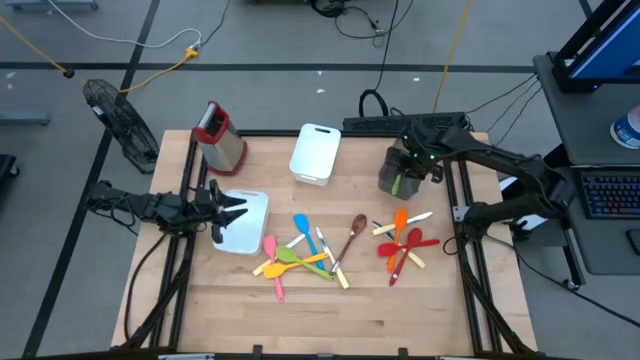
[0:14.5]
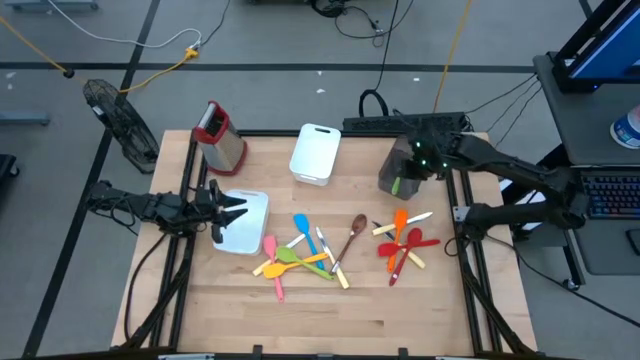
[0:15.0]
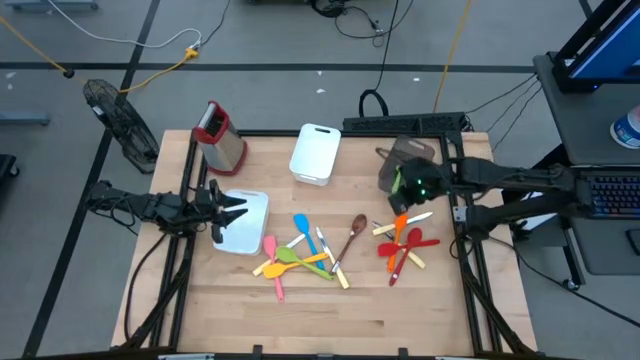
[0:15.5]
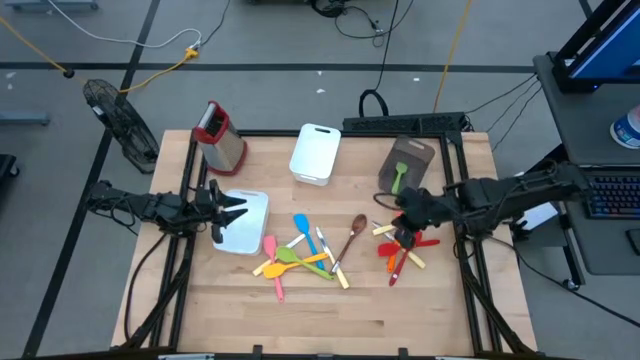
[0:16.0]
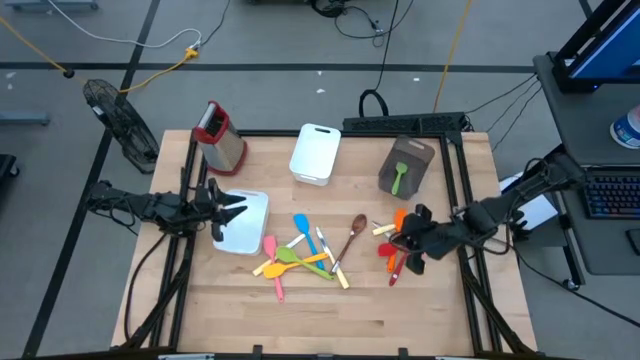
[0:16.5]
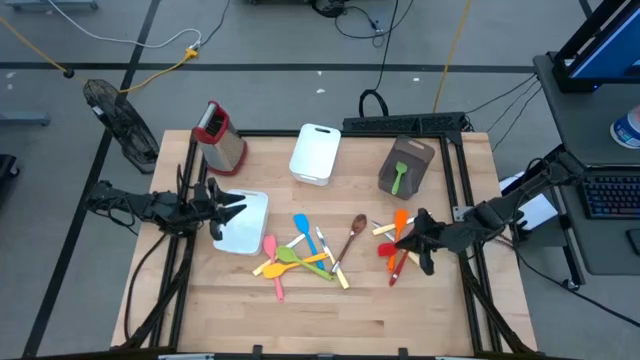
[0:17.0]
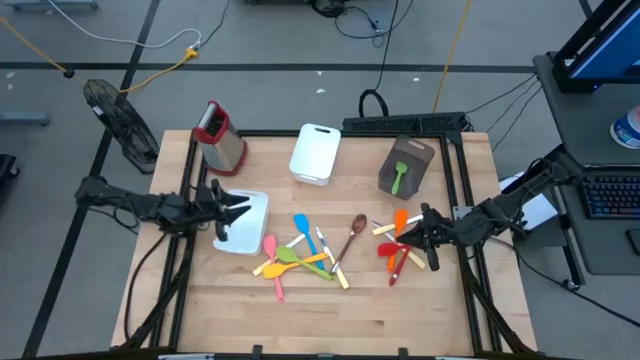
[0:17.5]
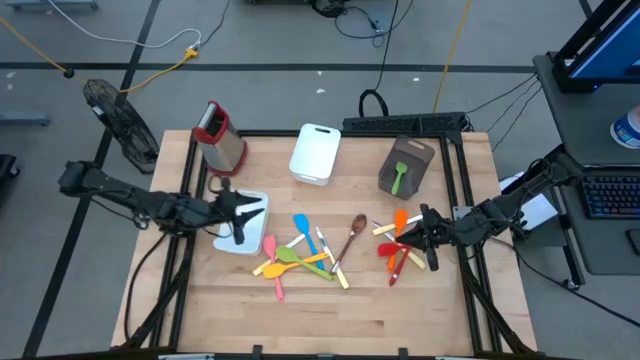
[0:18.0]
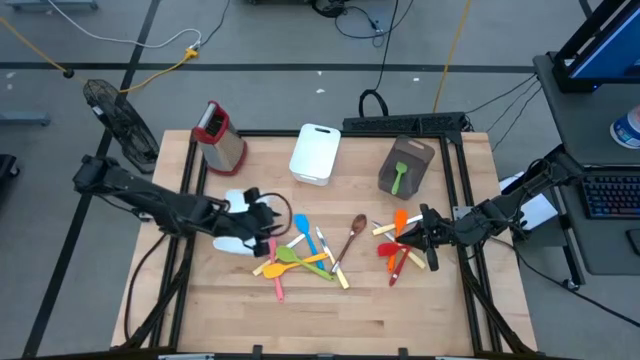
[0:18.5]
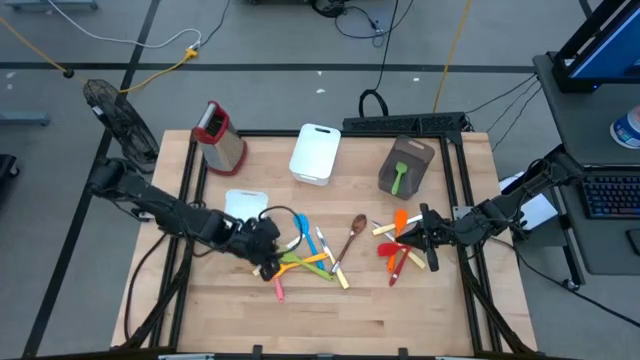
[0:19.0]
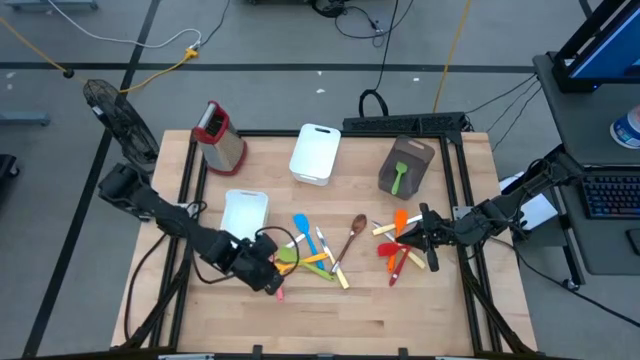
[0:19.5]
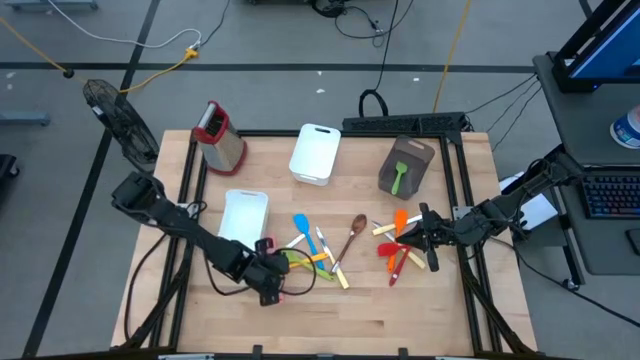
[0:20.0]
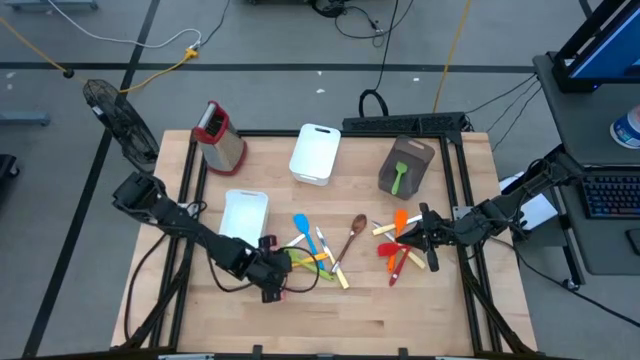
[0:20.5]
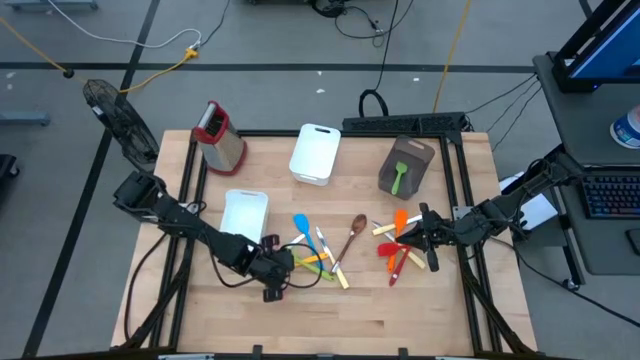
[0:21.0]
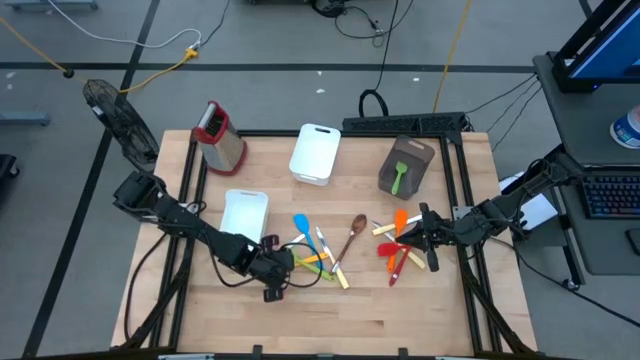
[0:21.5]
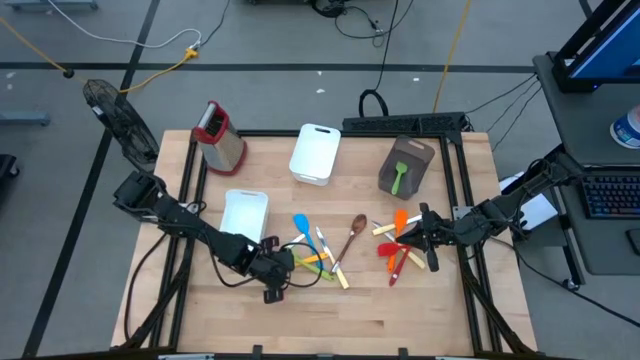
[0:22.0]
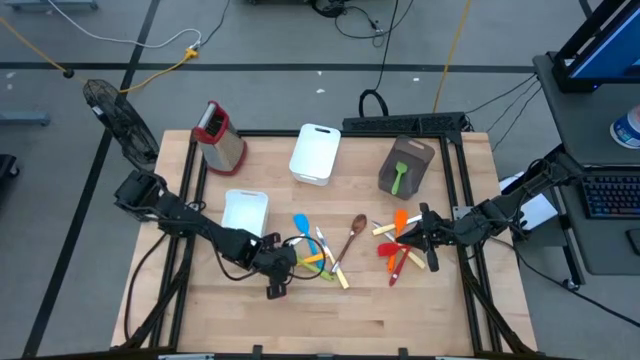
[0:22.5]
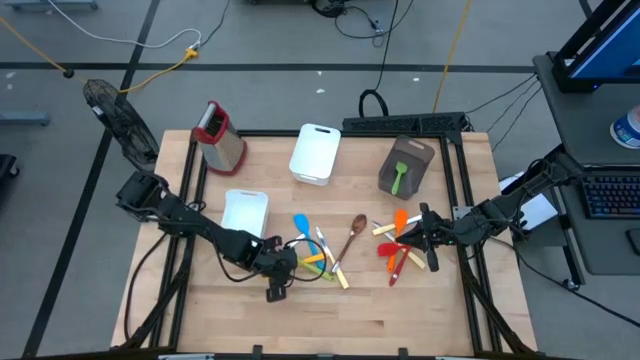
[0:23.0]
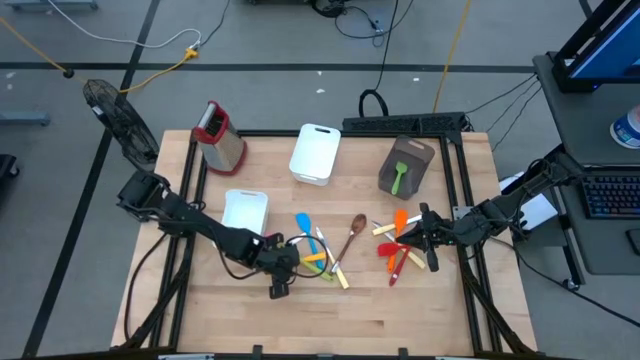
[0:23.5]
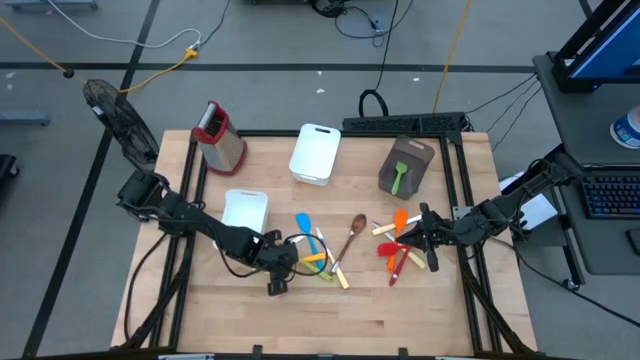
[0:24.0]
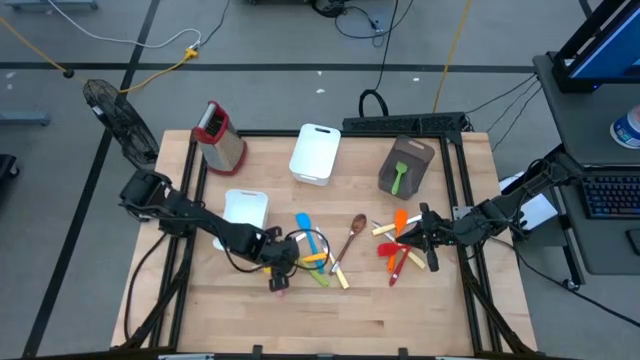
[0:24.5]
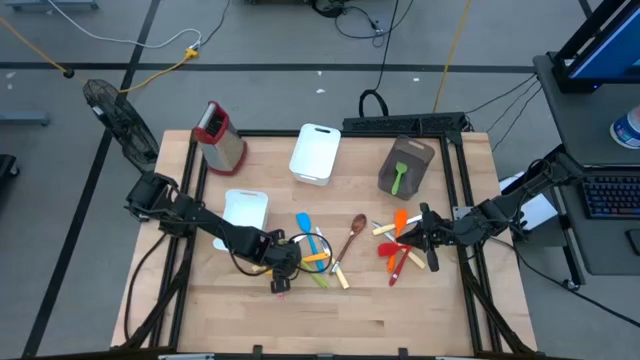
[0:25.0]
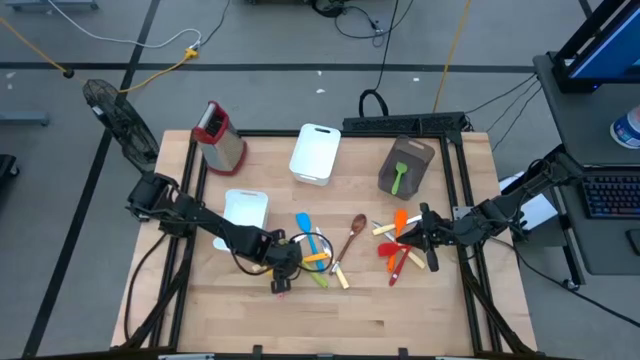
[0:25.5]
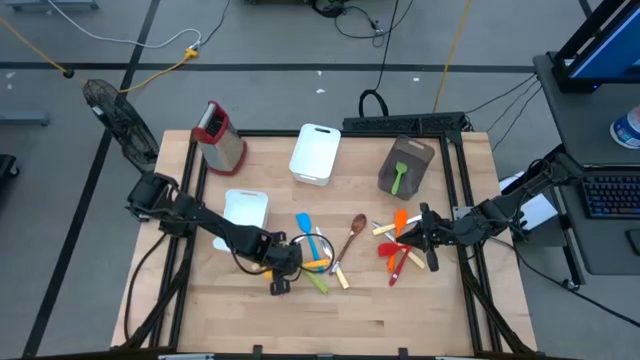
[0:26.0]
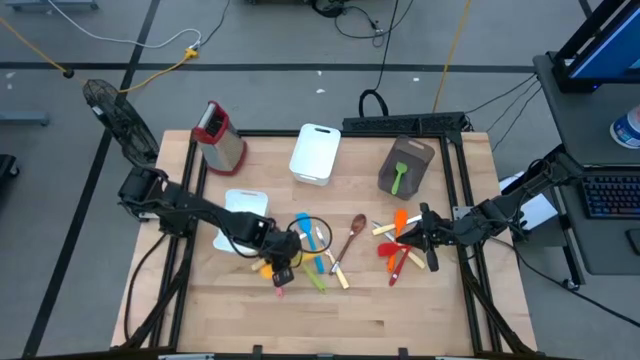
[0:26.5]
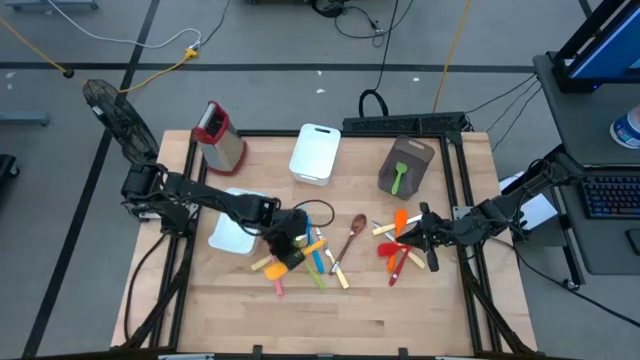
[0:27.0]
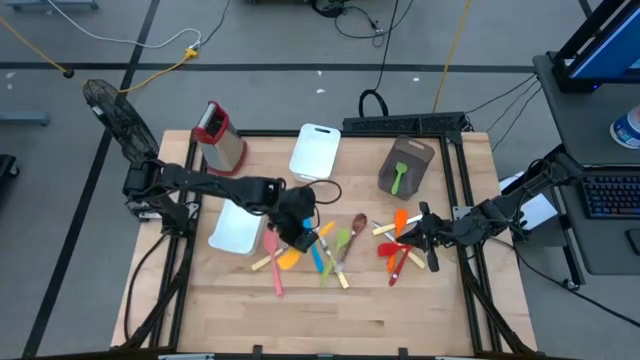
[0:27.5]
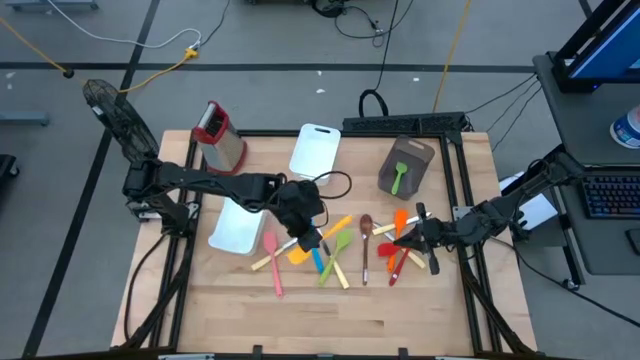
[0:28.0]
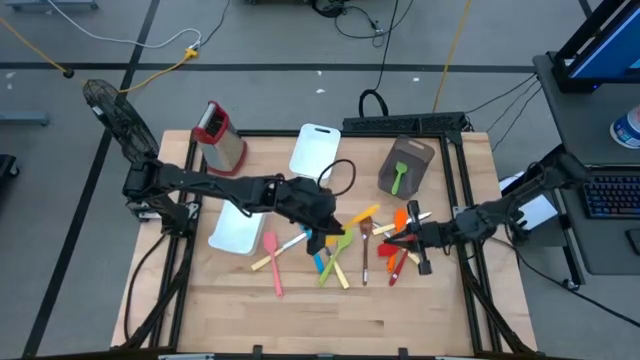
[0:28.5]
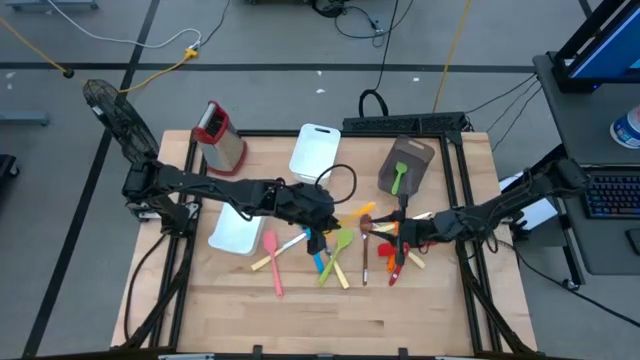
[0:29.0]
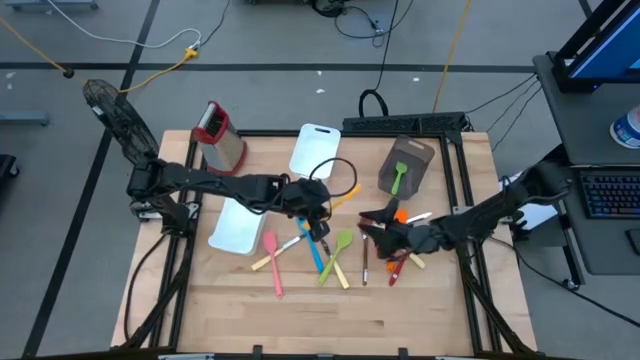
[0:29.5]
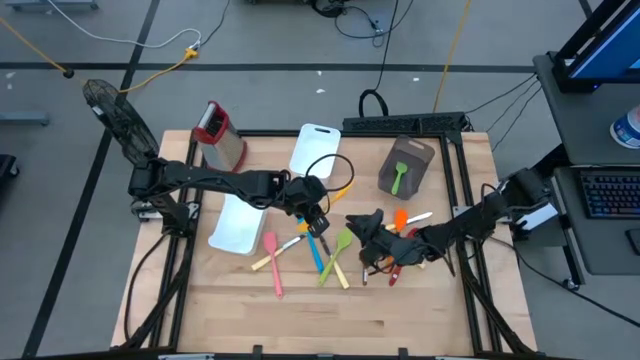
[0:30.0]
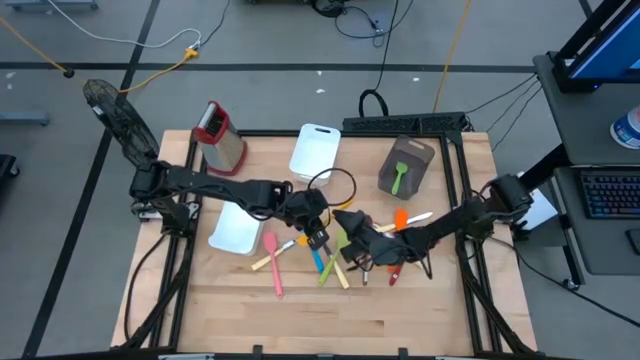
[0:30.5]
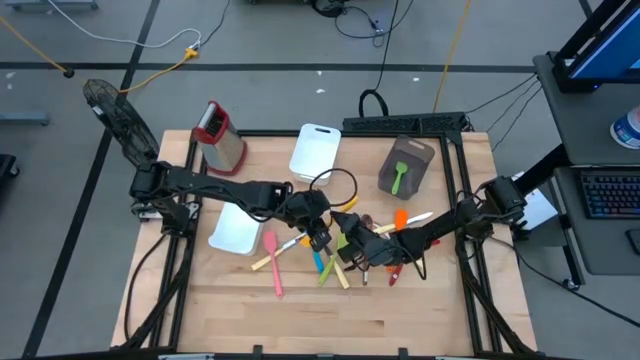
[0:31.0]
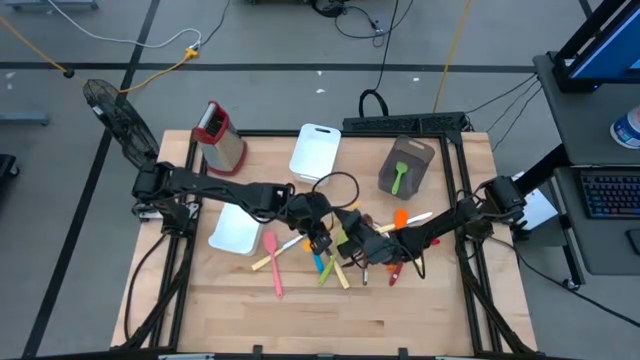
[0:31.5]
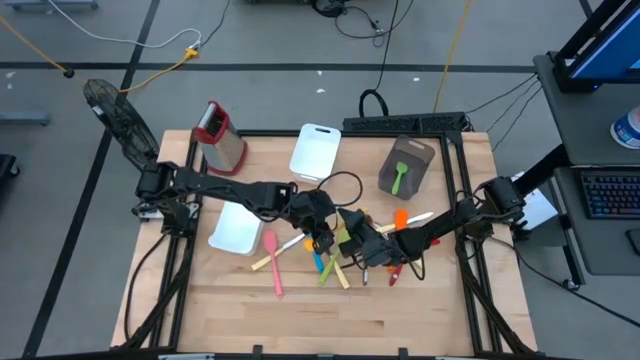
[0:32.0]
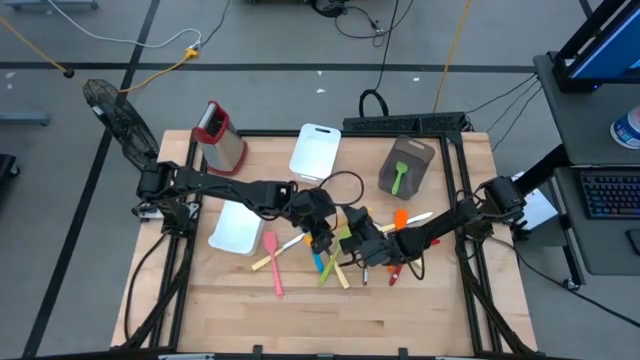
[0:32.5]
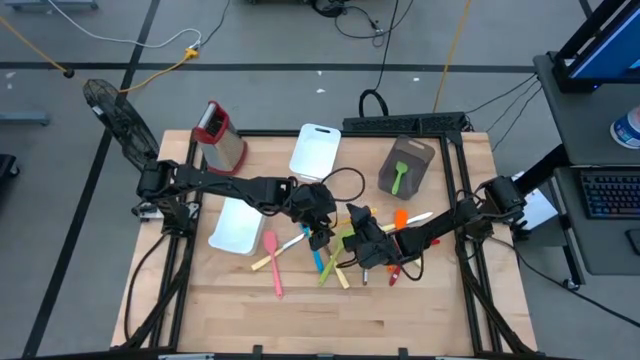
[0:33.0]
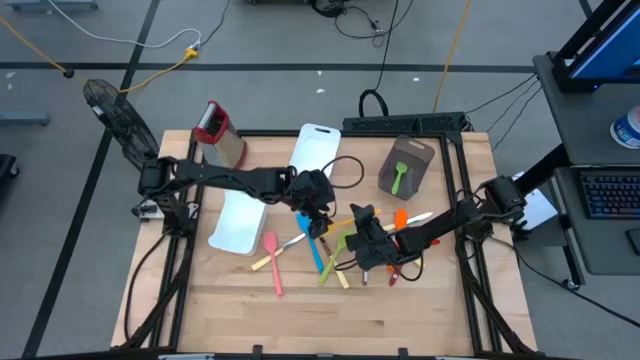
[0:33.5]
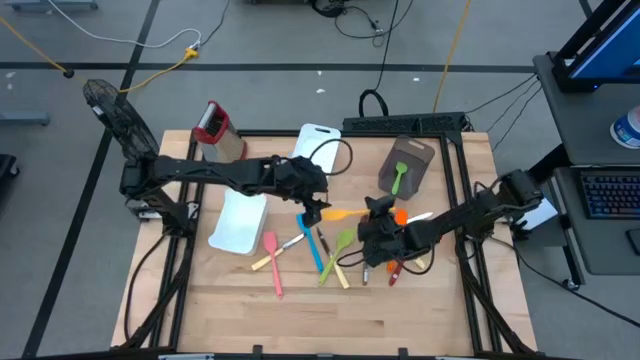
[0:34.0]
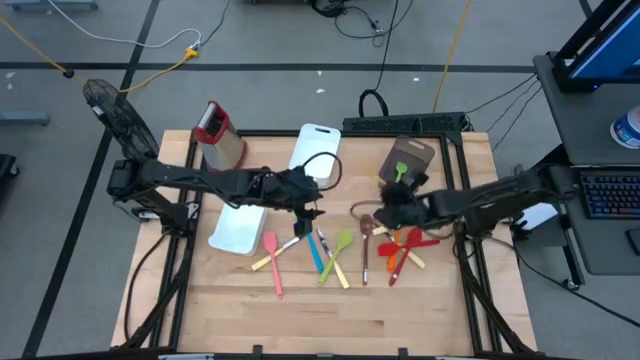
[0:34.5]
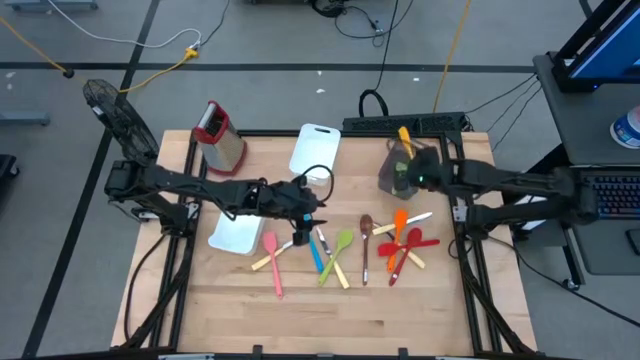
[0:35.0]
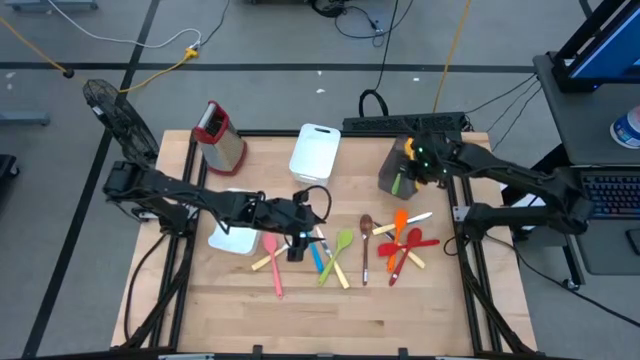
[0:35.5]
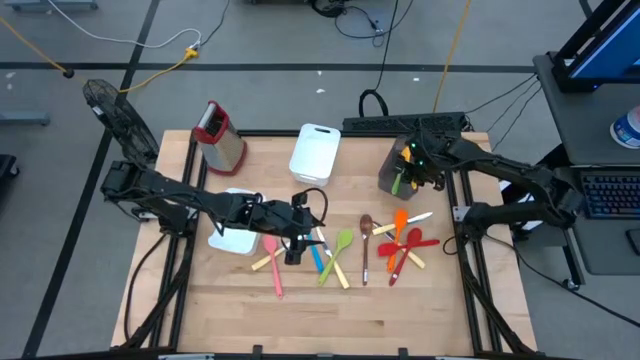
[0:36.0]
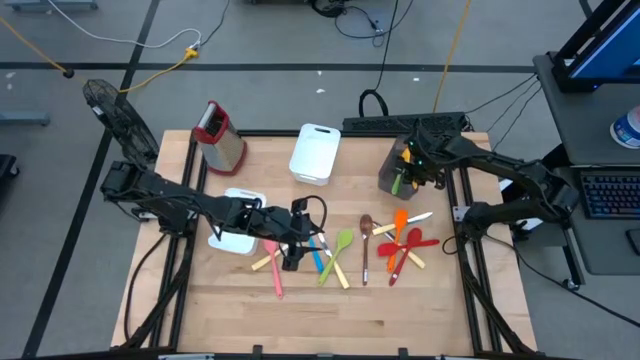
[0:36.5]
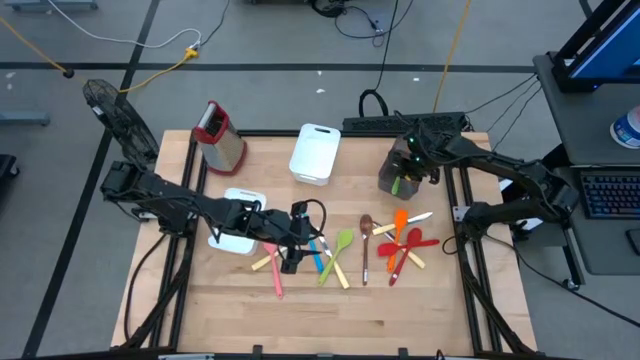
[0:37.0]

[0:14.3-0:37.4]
Task: Pick & Place Kitchen Items
Put the yellow spatula into the black bin
